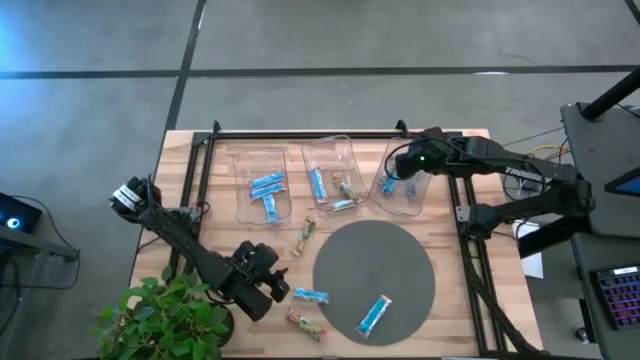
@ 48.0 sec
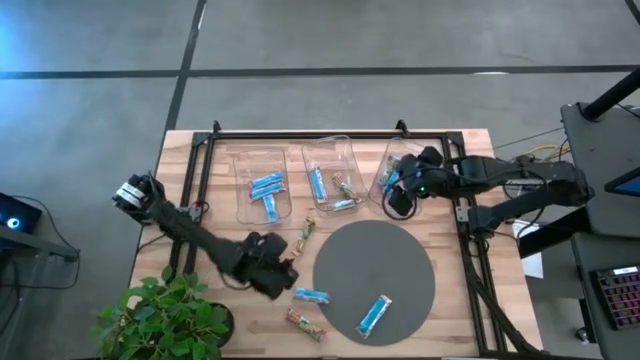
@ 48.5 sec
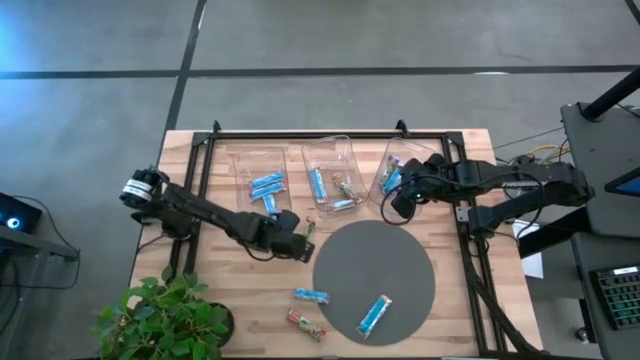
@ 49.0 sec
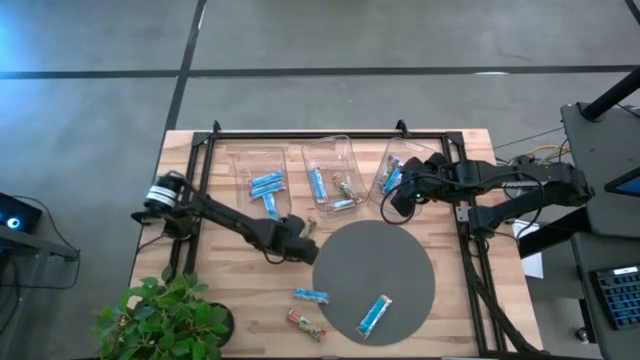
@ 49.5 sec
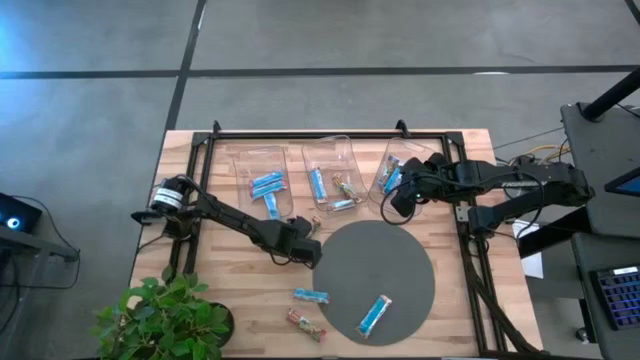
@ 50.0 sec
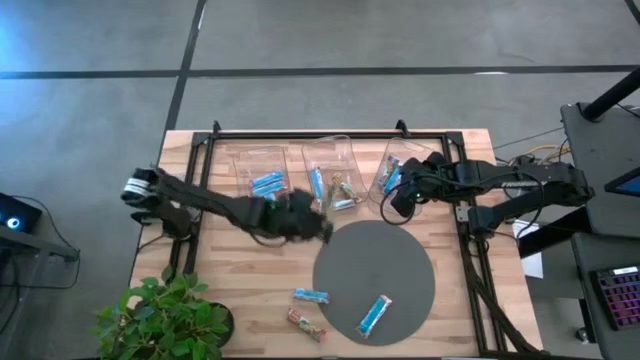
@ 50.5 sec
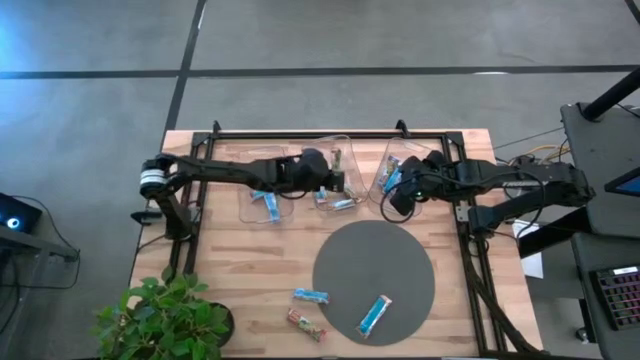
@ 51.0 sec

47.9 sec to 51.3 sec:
Task: Pick and place Granola Bars by type
Put the top yellow granola bar into the middle transparent bin

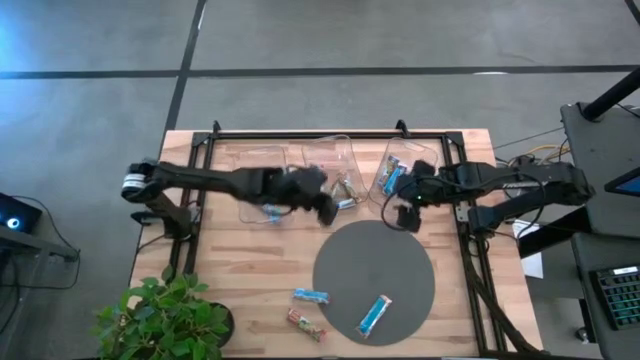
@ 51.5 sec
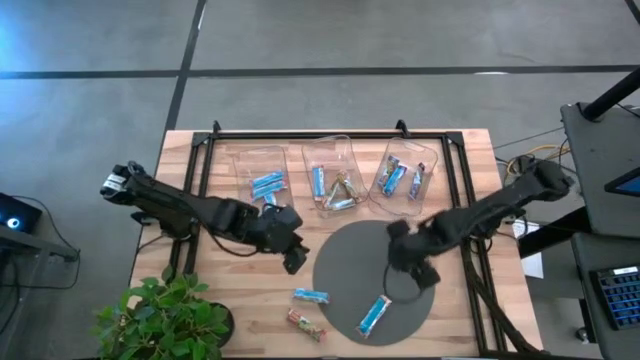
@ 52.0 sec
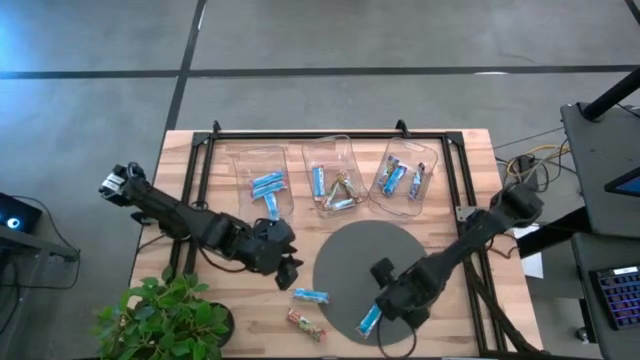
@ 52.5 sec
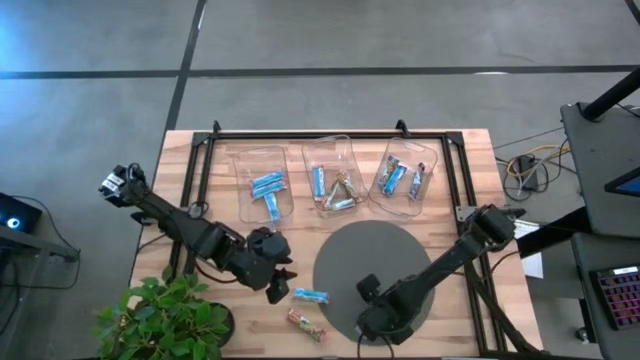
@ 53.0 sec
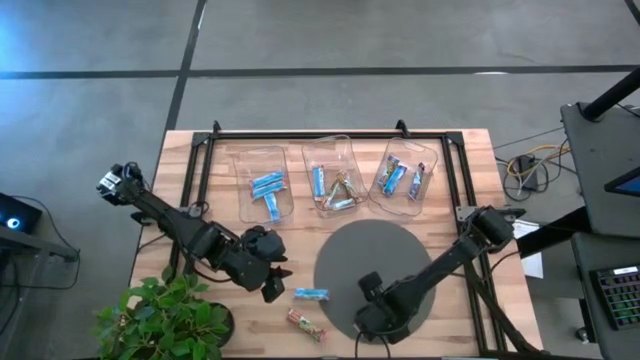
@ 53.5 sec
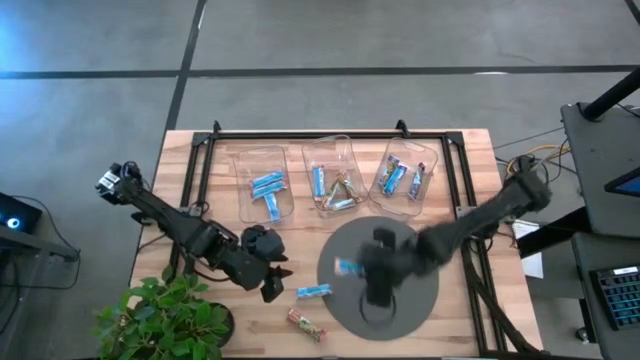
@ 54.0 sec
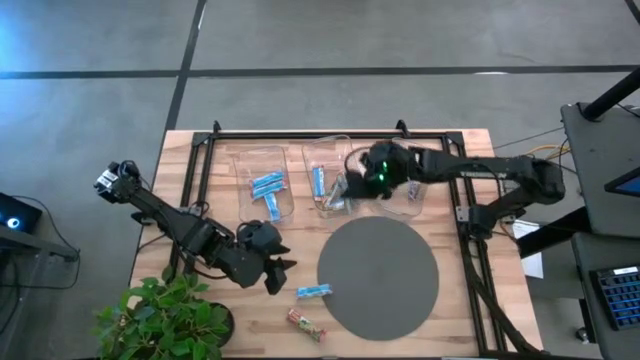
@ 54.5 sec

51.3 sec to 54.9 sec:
Put the yellow granola bar into the middle transparent bin

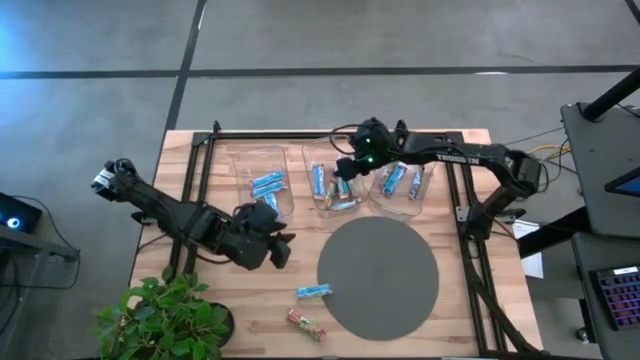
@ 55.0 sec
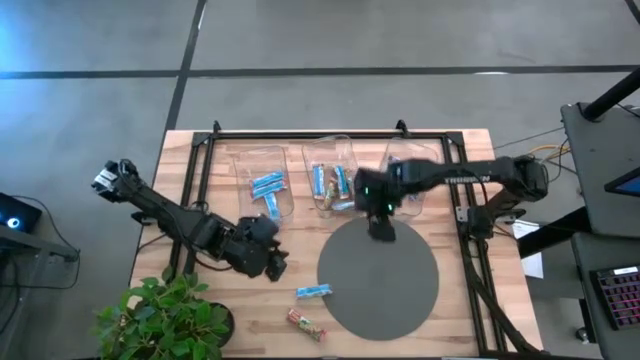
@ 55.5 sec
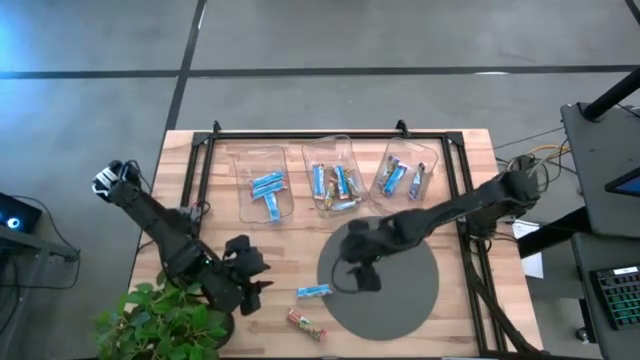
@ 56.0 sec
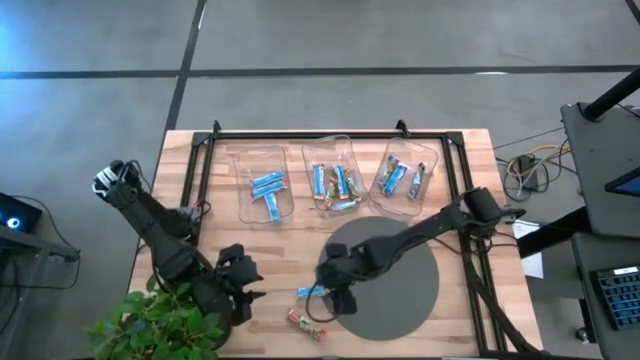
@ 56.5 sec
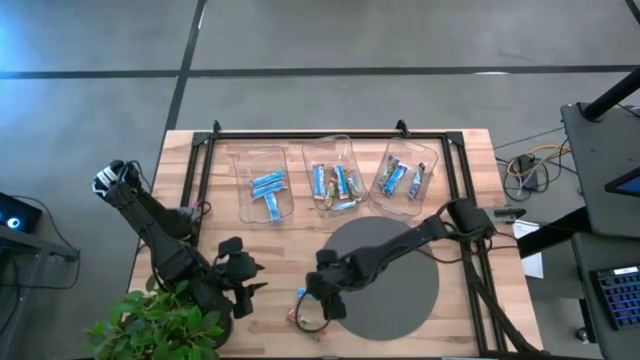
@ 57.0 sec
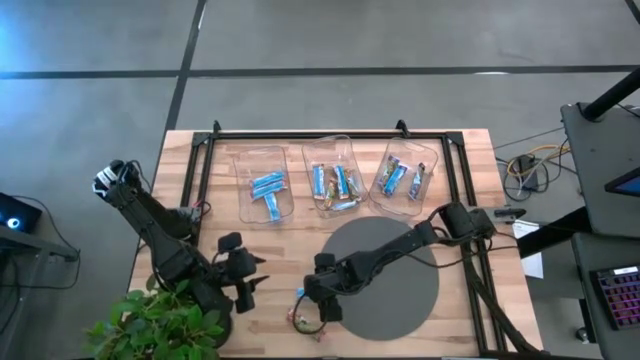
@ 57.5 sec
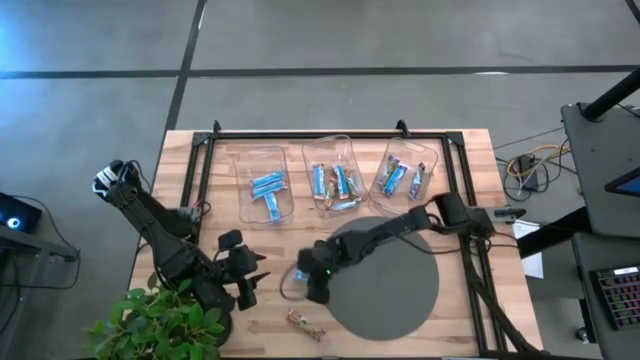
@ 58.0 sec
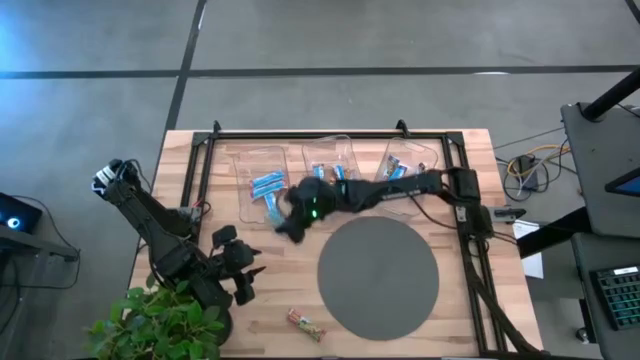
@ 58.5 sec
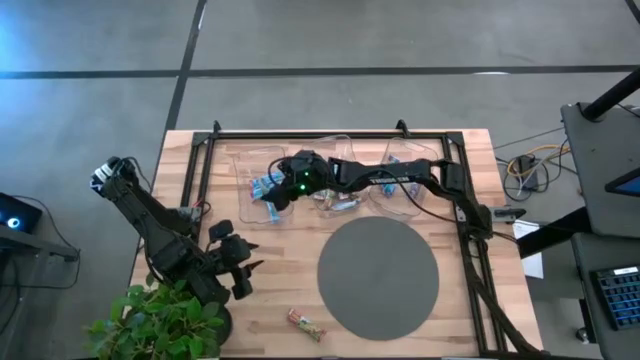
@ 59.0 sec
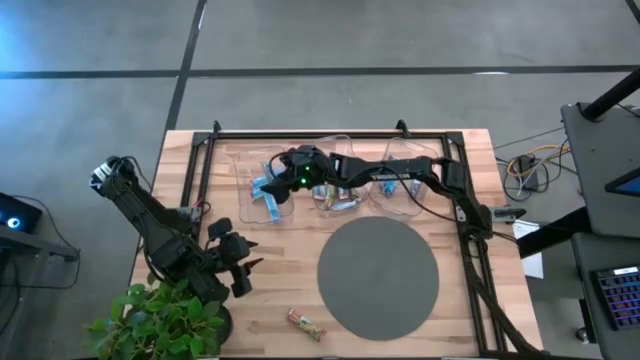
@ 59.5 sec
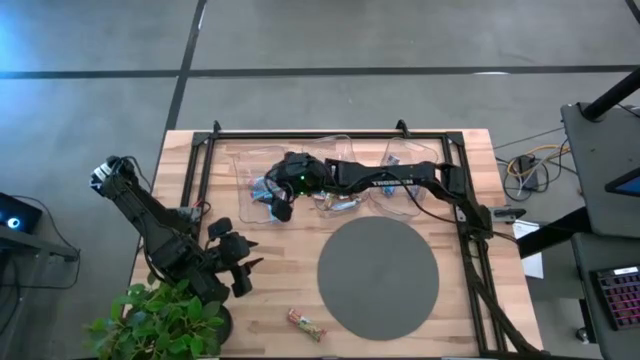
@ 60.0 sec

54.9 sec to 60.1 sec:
Put the top red granola bar into the left transparent bin

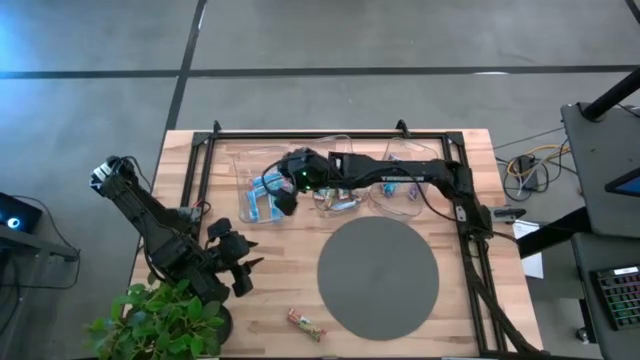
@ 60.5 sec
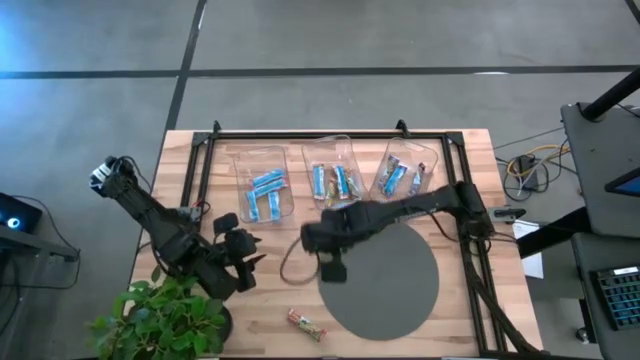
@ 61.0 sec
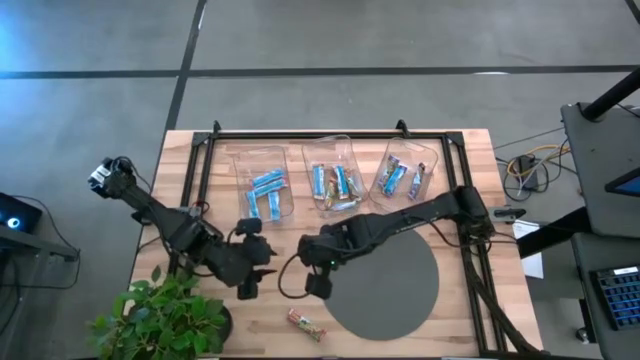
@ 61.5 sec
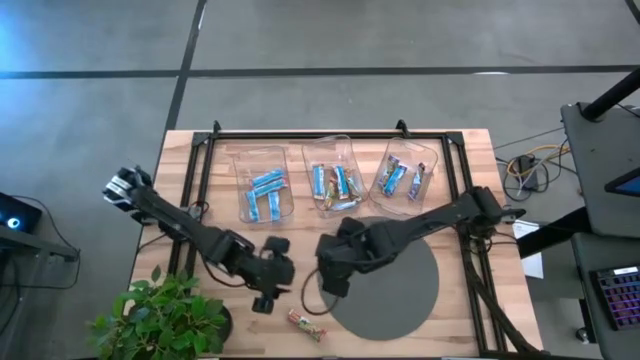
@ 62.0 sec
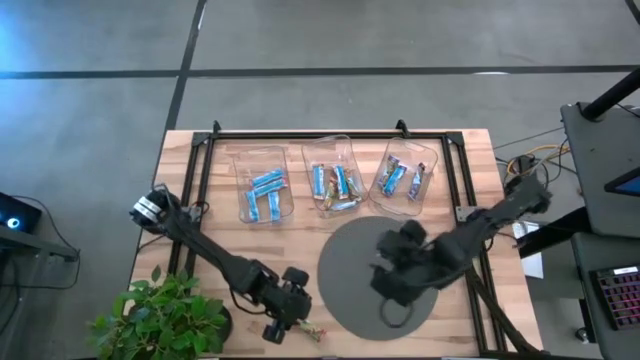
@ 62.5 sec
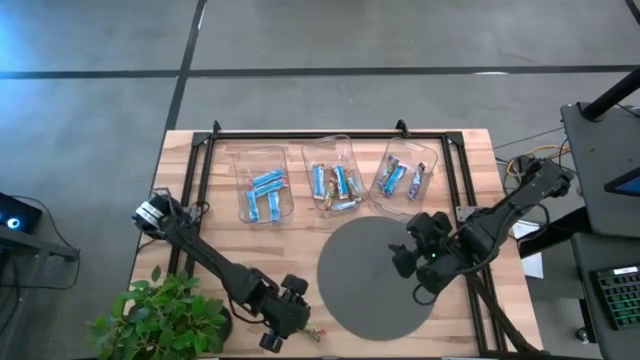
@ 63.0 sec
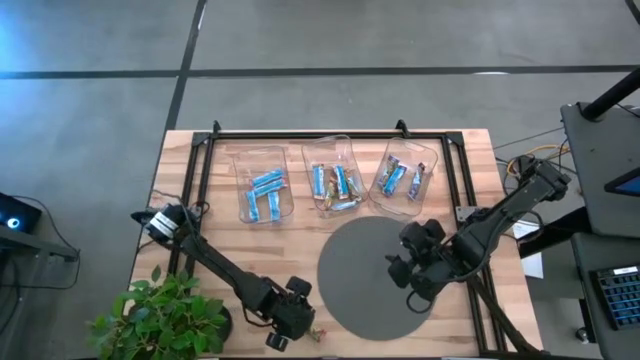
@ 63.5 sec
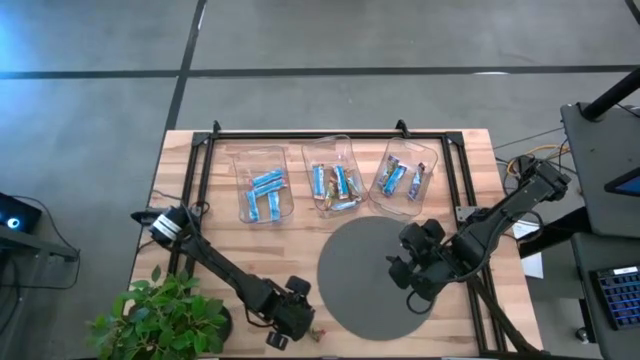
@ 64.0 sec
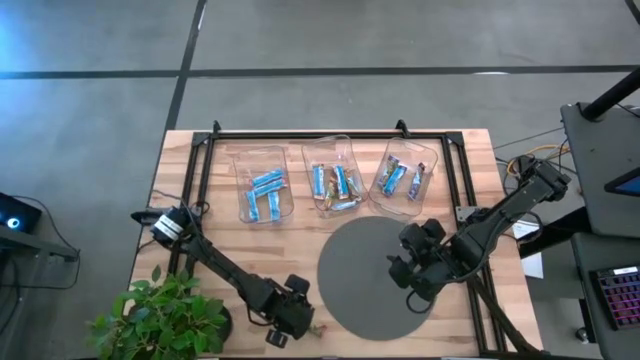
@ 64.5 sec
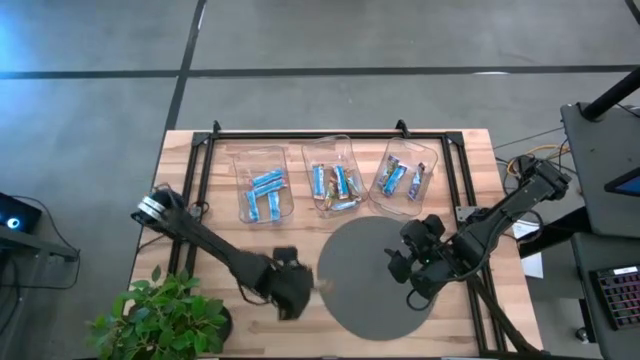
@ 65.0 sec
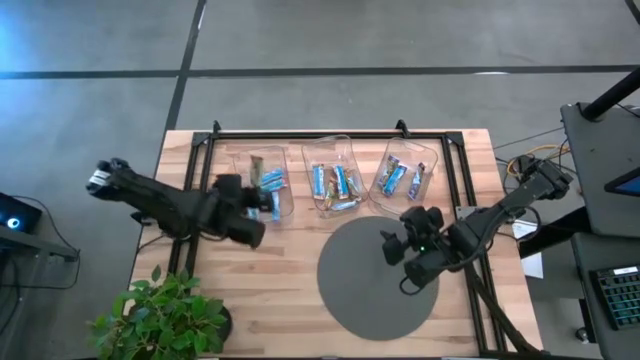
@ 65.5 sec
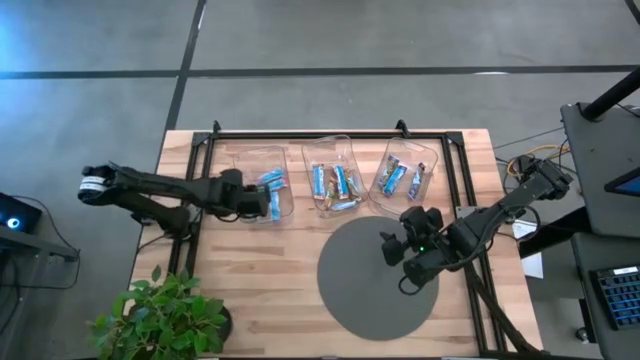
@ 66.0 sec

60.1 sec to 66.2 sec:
Put the red granola bar into the left transparent bin

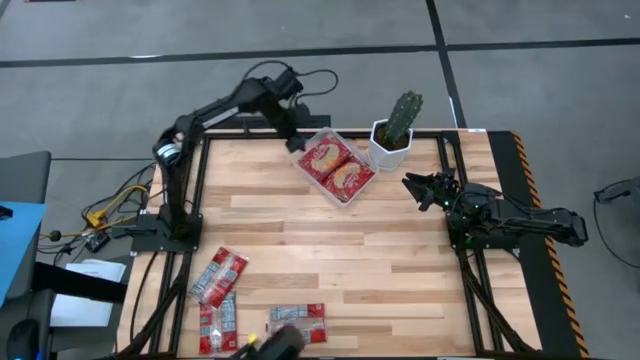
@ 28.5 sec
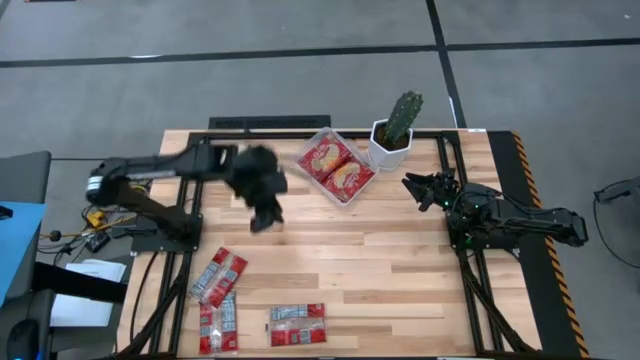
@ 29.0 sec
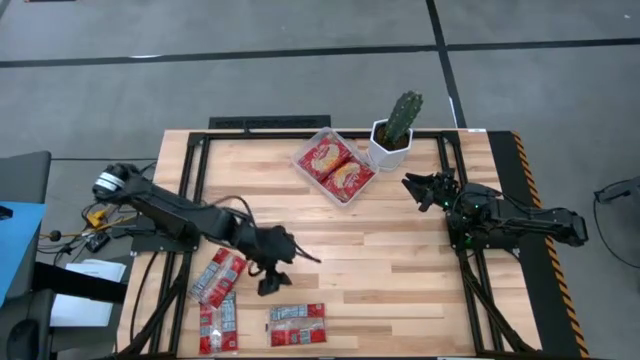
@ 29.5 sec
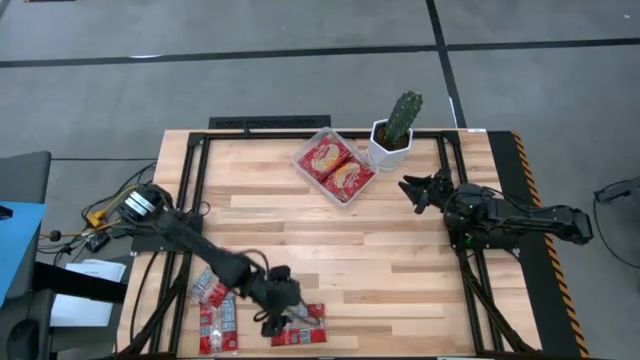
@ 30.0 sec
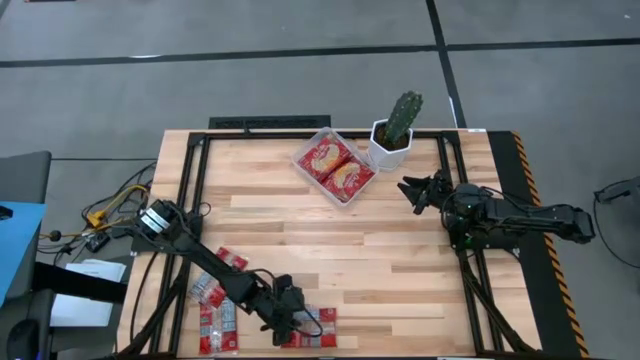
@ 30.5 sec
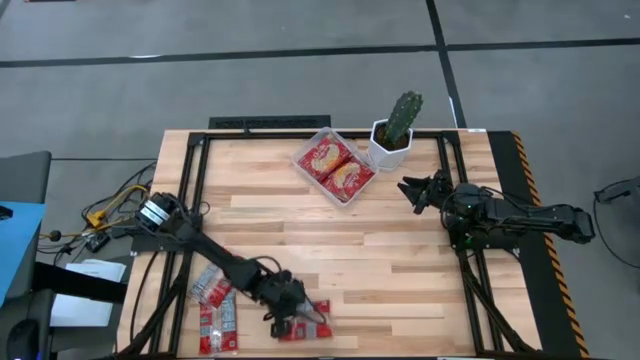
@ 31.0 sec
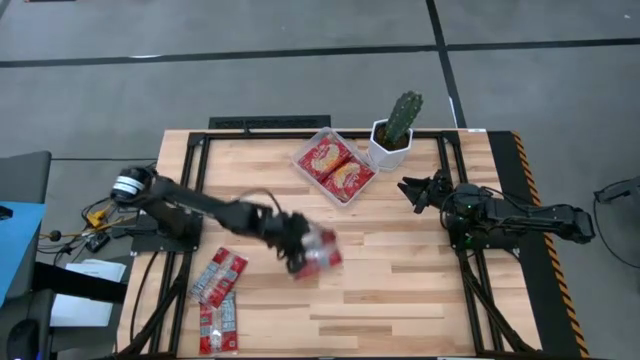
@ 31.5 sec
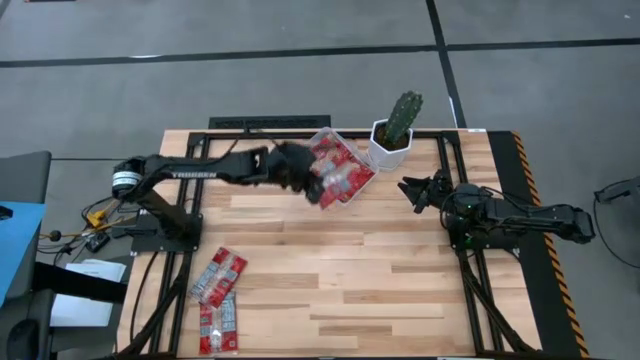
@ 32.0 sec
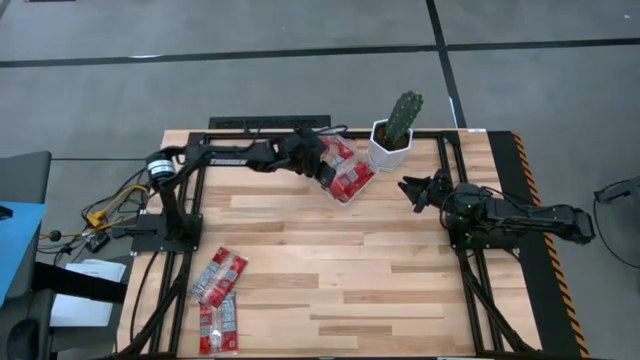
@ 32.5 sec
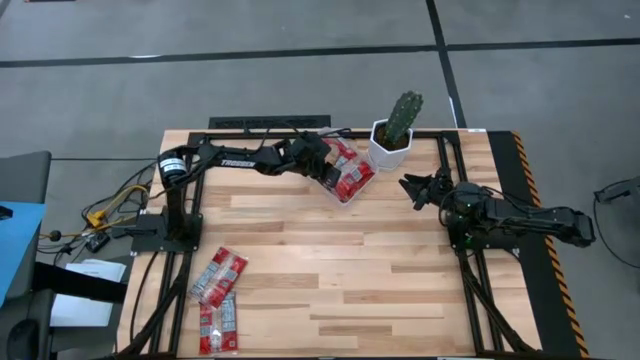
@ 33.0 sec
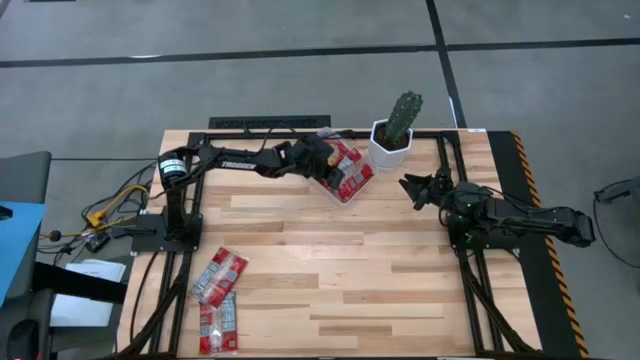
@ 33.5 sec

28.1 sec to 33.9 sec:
Task: Sort popcorn bags into baskets
Put the red popcorn bag into the transparent bin
